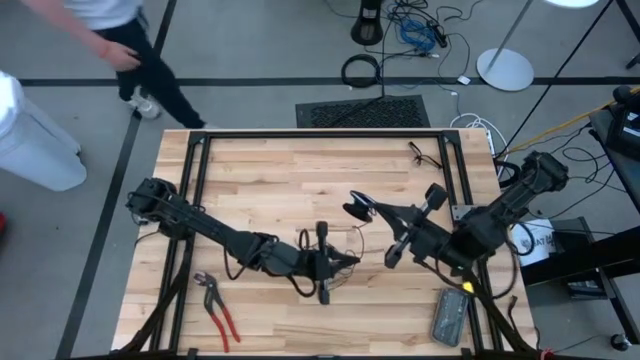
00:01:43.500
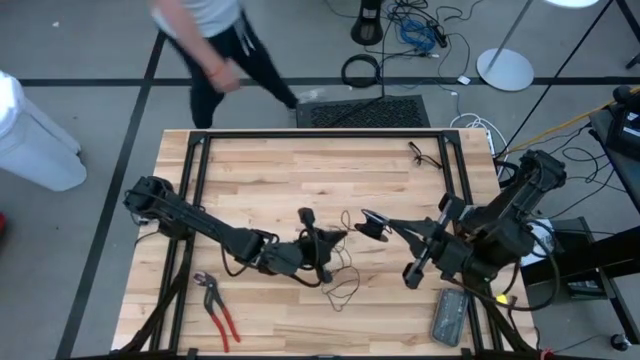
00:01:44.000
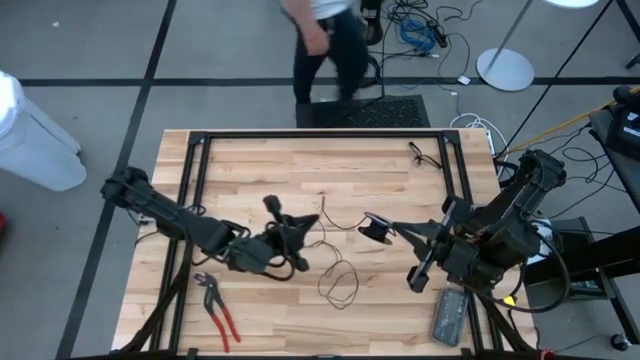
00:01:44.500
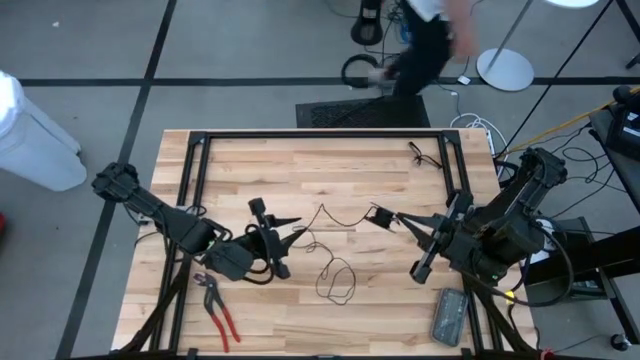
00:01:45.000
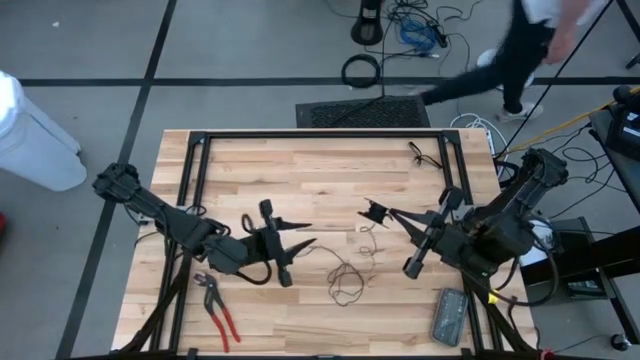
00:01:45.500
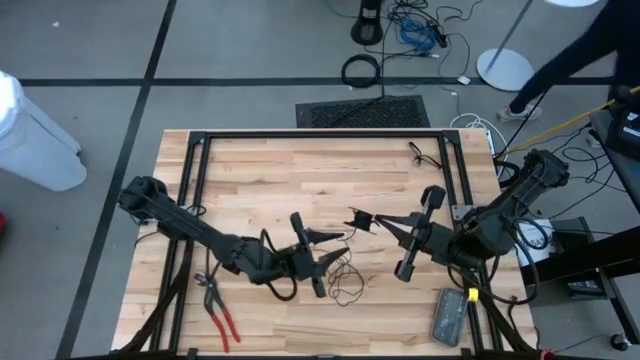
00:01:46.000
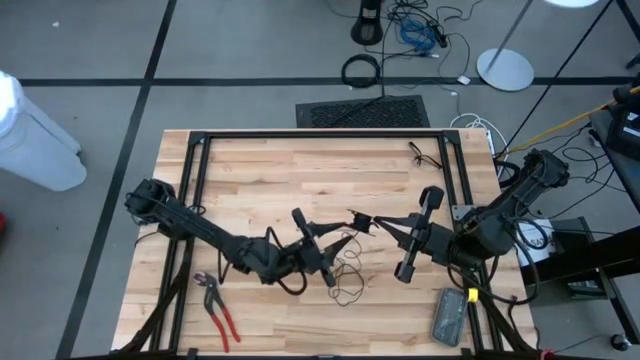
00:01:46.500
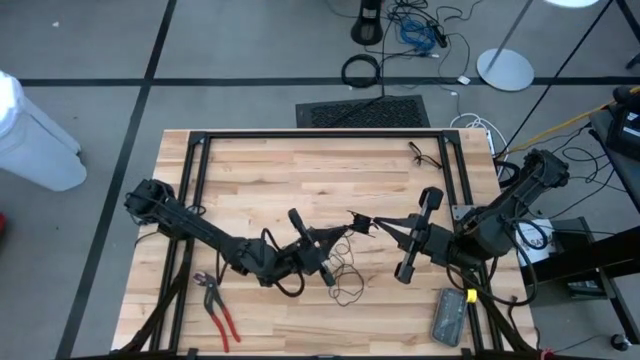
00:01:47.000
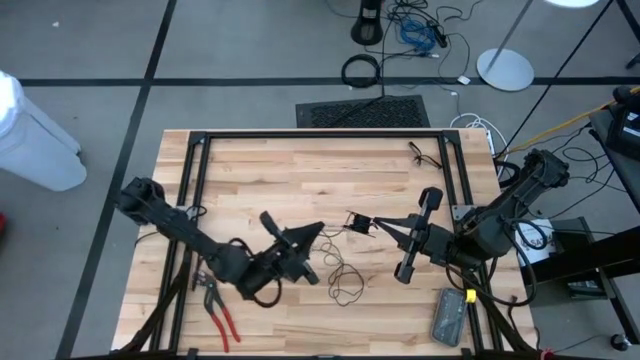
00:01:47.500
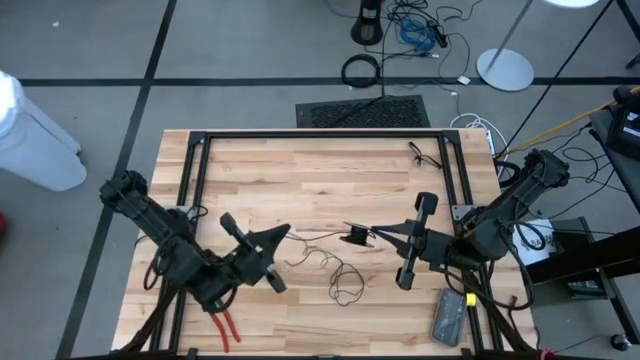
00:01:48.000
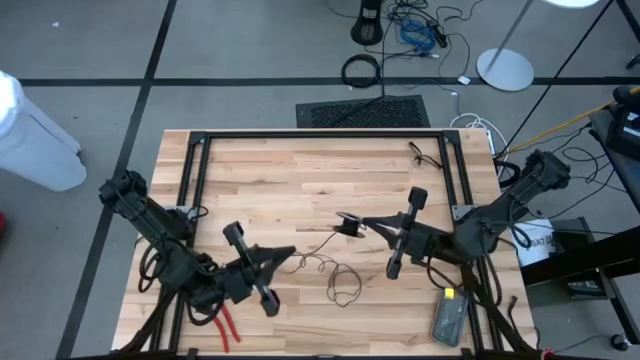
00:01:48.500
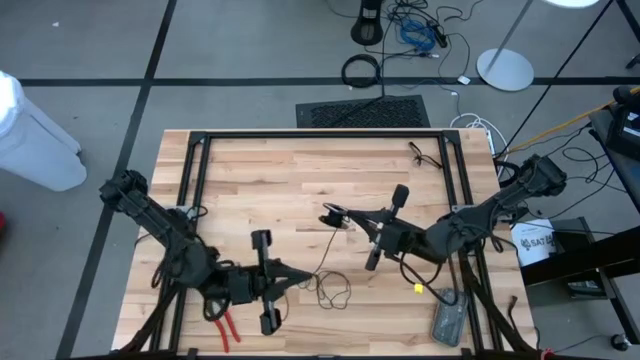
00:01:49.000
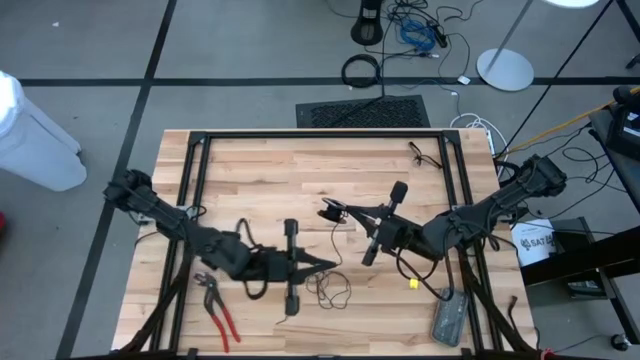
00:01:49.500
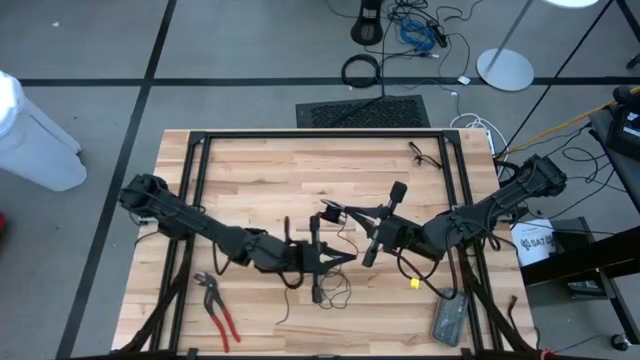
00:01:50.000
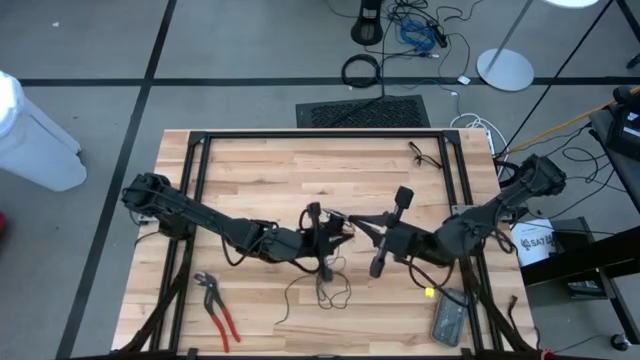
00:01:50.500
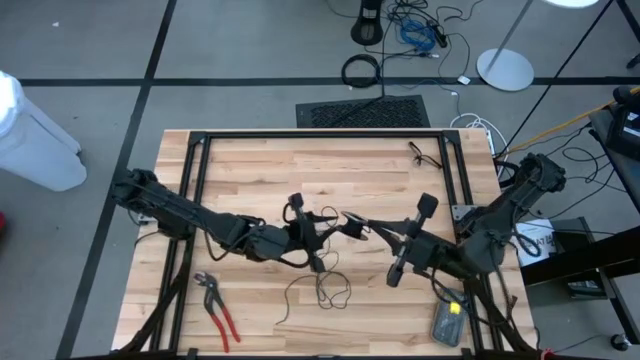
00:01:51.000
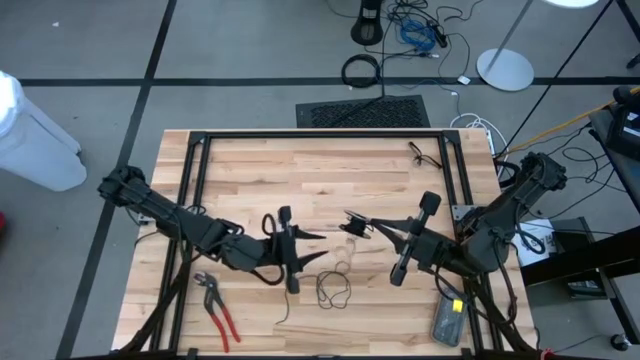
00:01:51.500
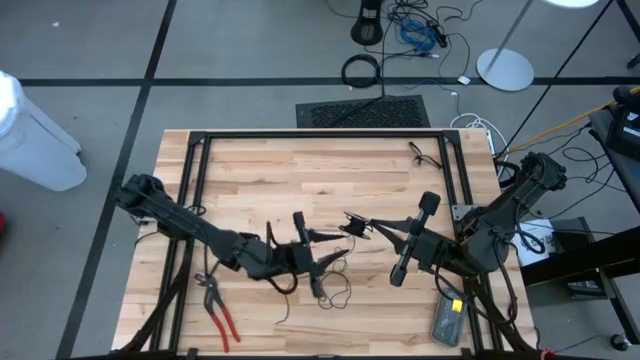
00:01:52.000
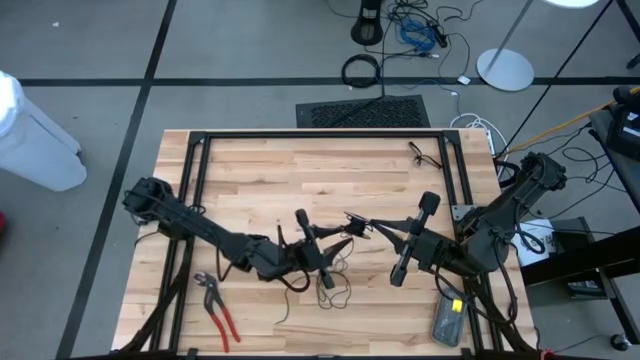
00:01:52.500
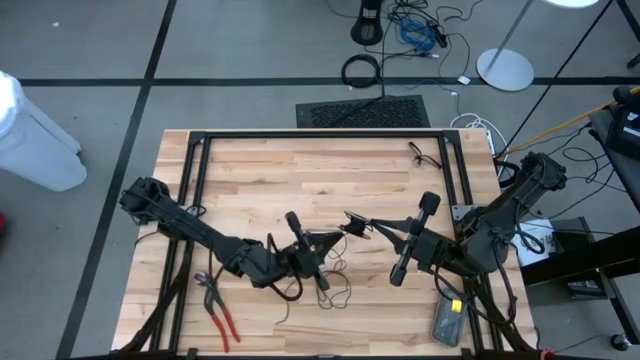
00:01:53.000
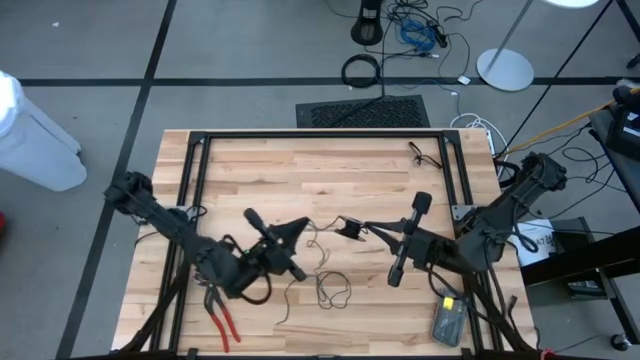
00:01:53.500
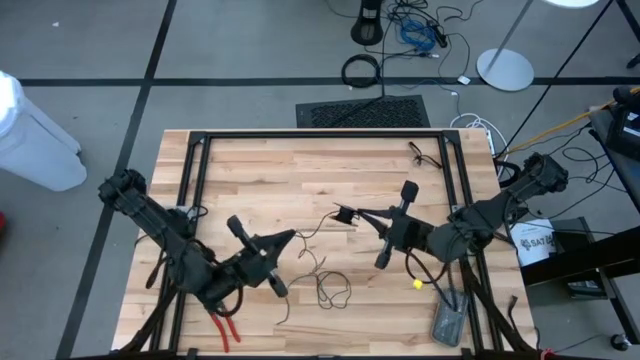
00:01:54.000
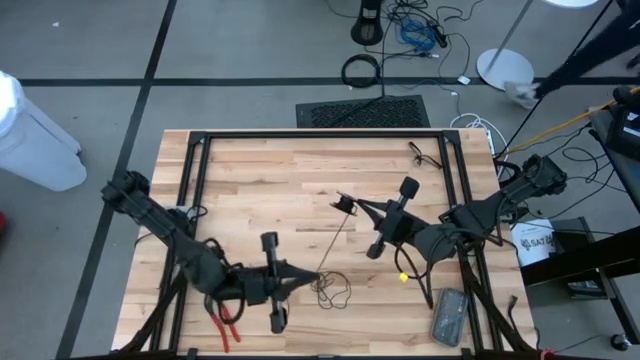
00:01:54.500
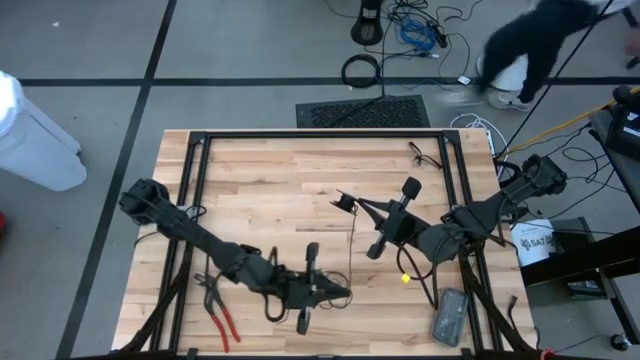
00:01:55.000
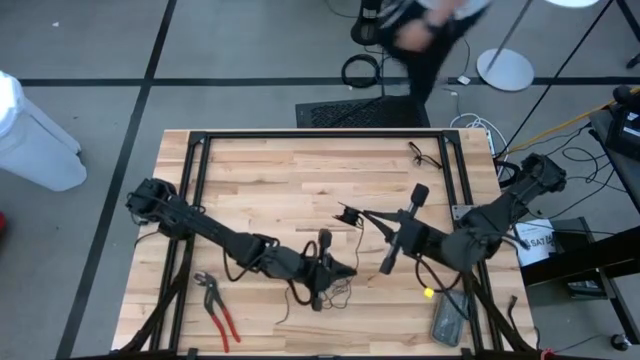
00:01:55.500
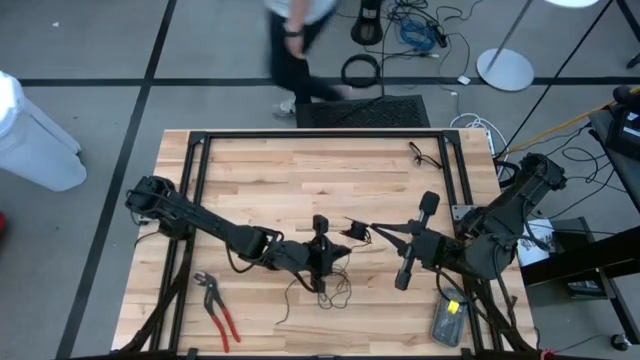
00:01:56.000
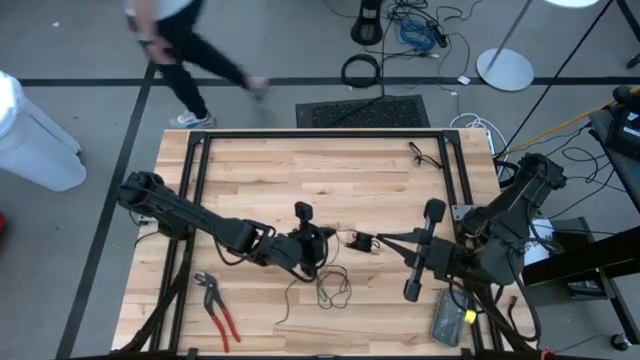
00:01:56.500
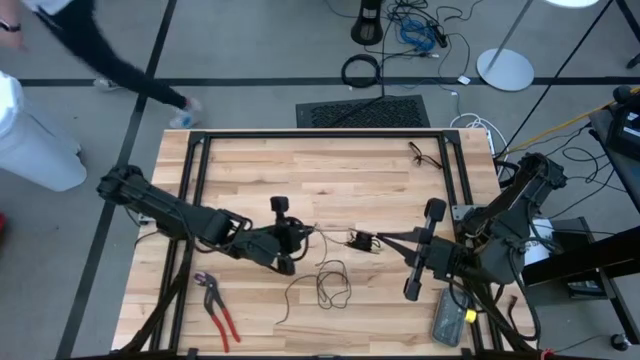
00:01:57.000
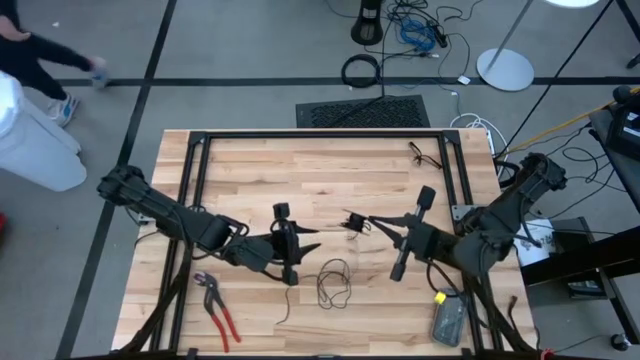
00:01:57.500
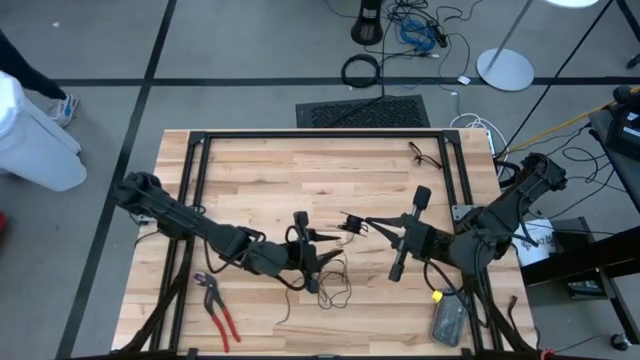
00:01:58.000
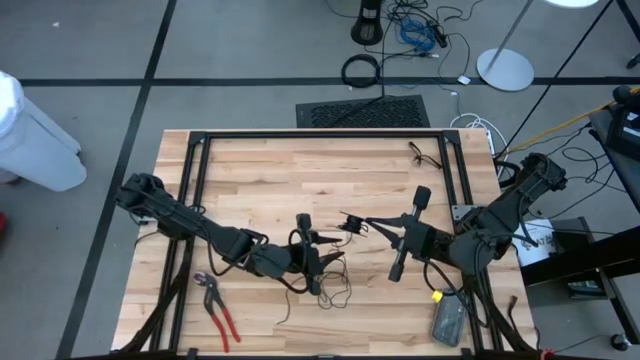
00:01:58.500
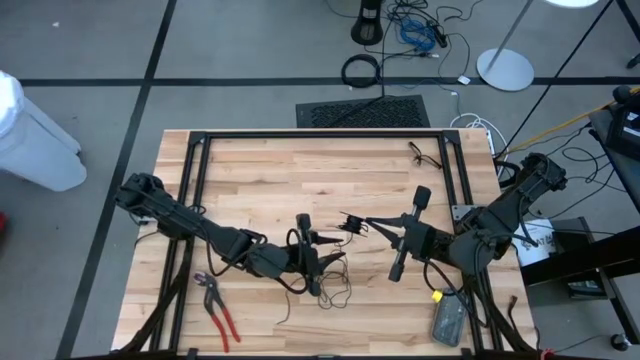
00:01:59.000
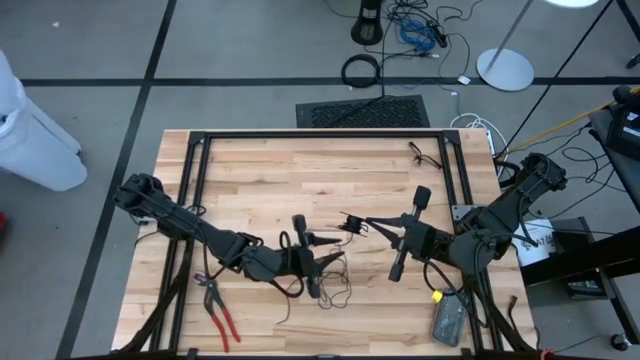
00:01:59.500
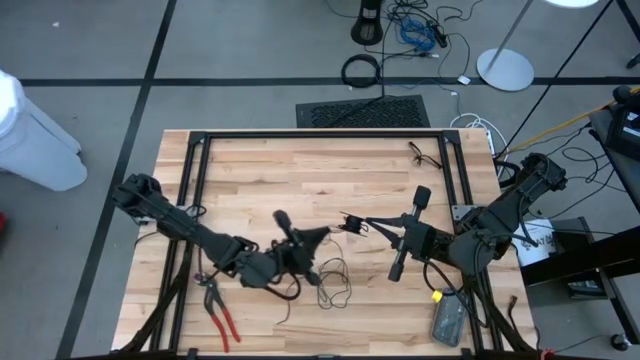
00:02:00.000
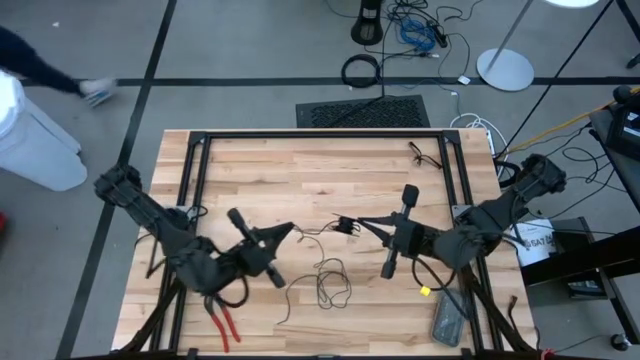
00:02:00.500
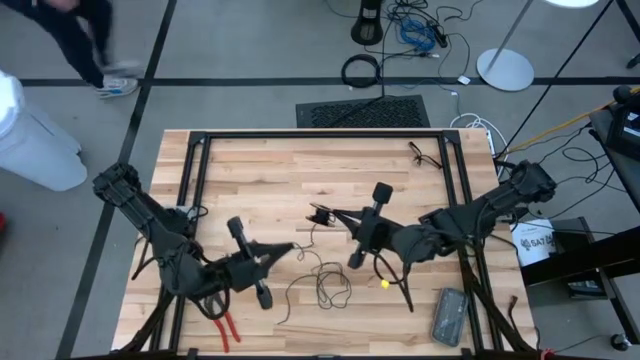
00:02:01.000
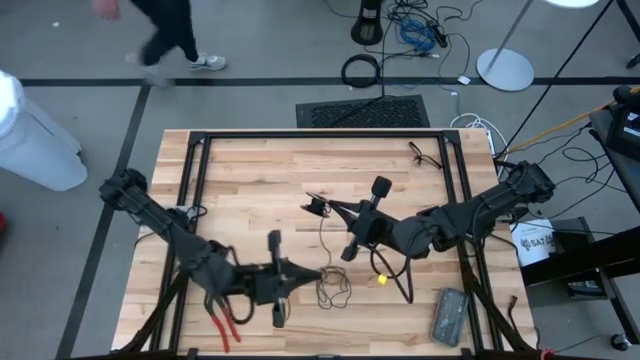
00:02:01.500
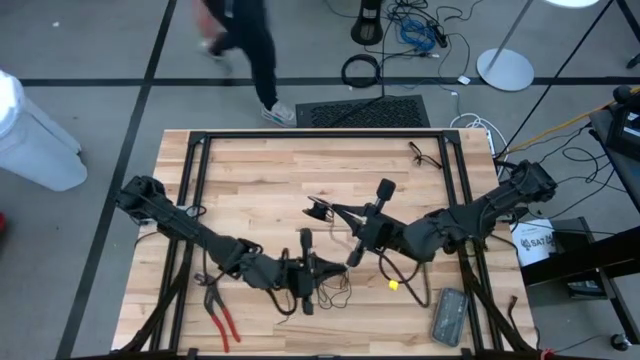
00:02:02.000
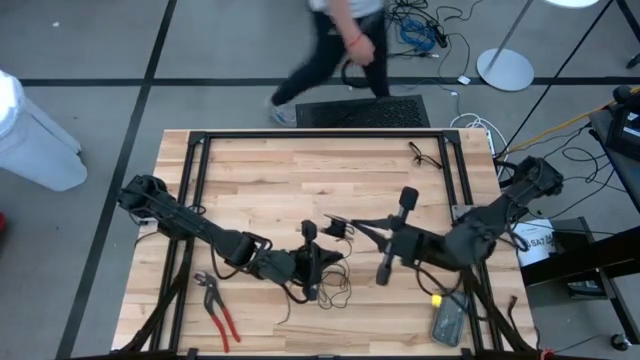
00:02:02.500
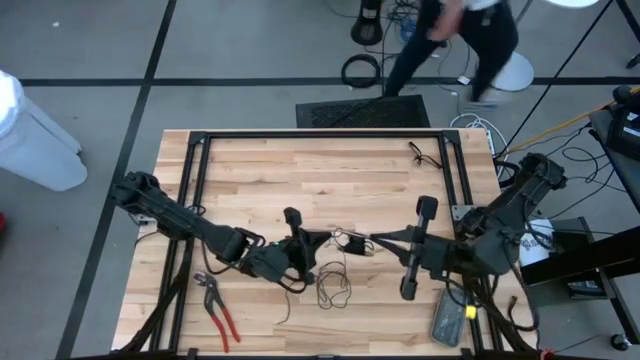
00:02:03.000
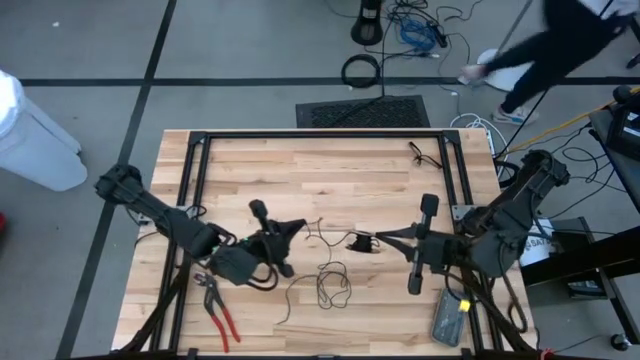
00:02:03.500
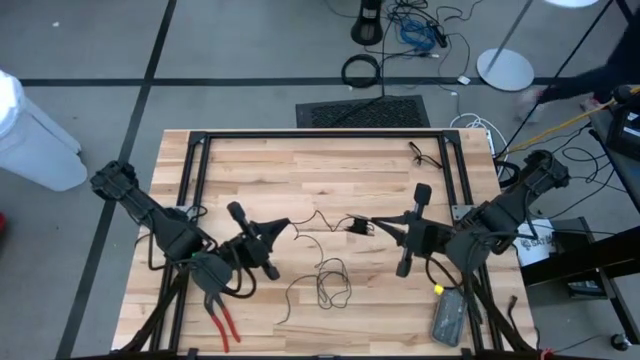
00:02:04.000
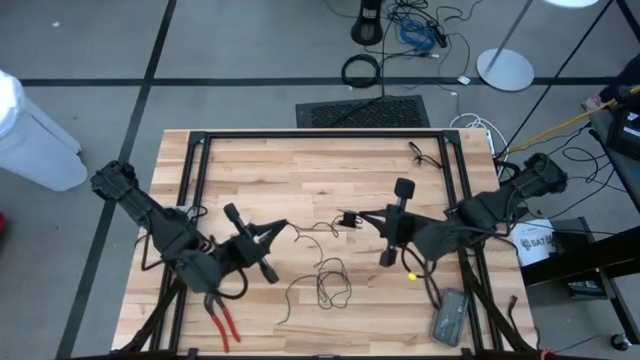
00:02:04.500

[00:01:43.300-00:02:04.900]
Task: Coil cords
Uncoil the black wire from the black spool
